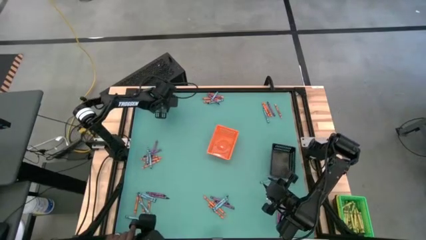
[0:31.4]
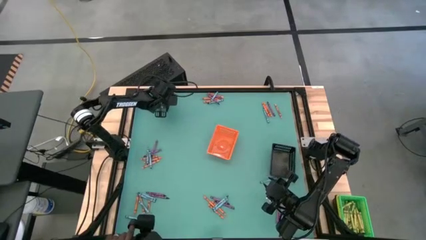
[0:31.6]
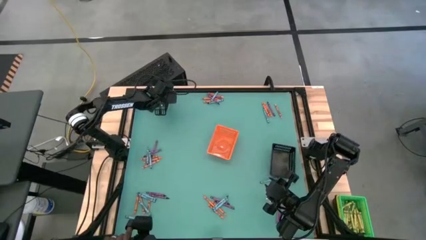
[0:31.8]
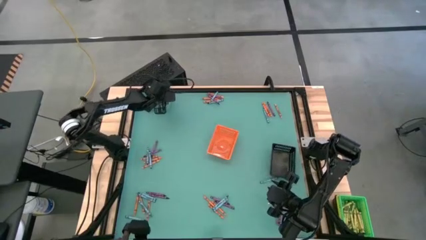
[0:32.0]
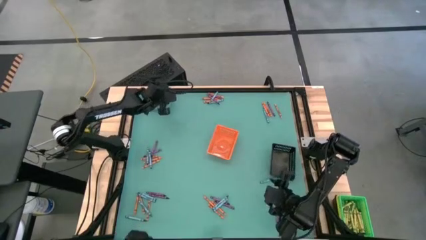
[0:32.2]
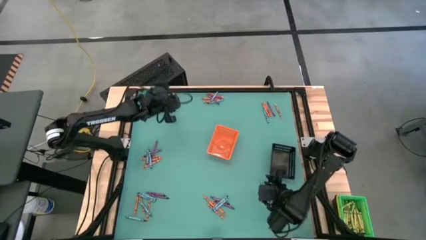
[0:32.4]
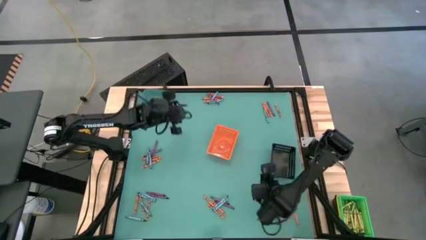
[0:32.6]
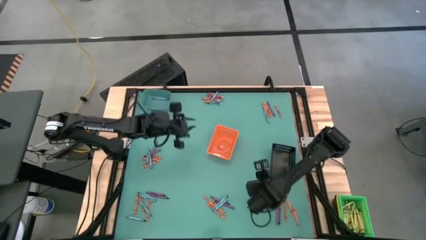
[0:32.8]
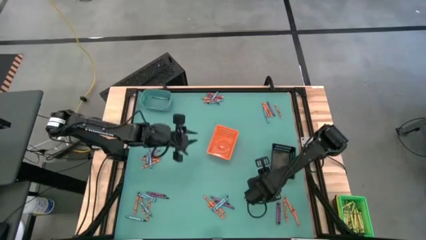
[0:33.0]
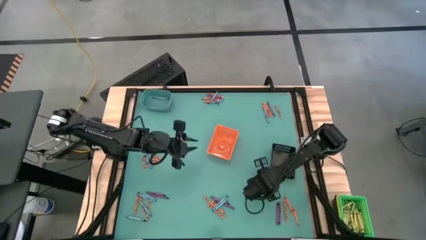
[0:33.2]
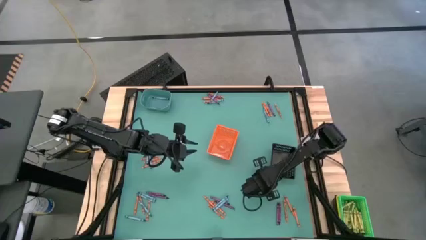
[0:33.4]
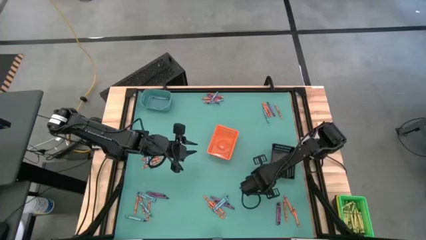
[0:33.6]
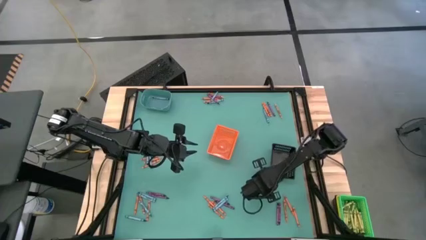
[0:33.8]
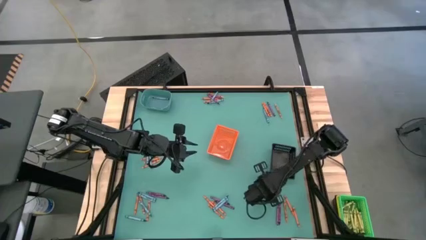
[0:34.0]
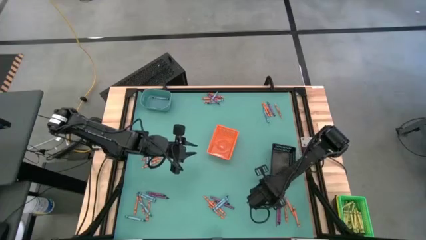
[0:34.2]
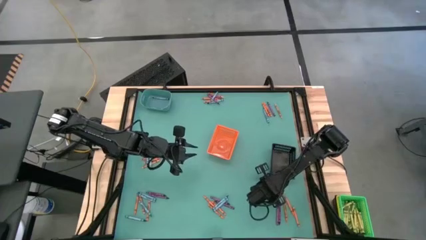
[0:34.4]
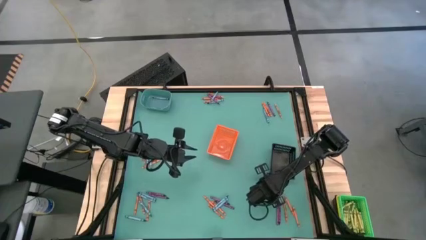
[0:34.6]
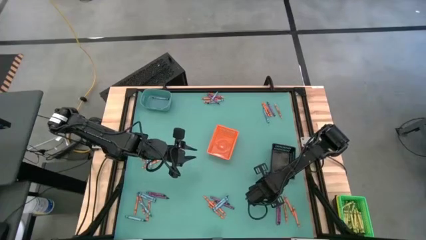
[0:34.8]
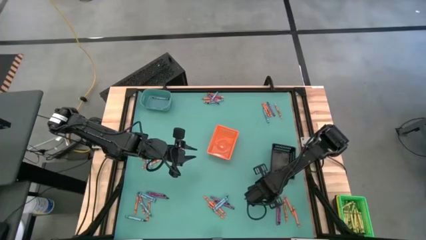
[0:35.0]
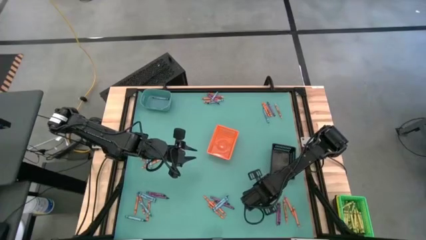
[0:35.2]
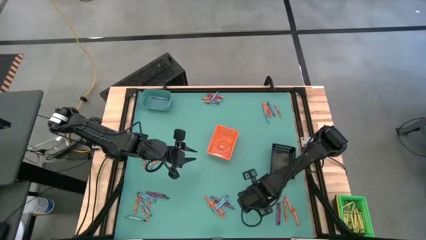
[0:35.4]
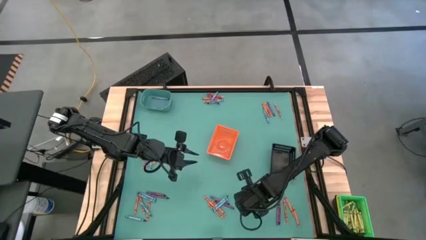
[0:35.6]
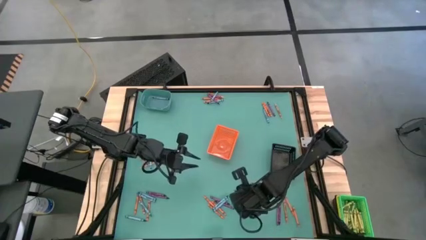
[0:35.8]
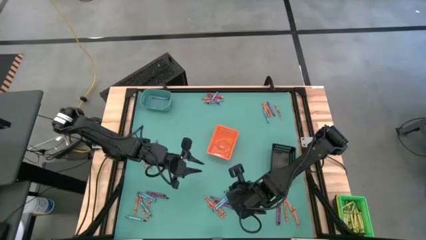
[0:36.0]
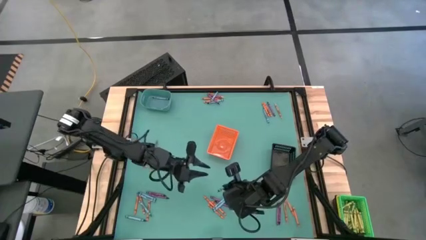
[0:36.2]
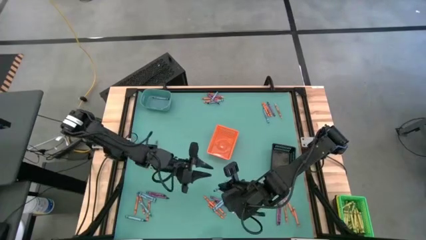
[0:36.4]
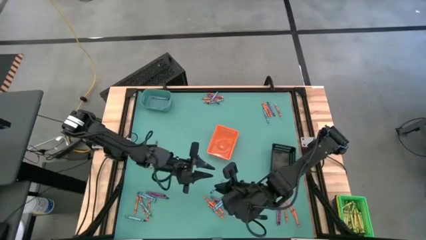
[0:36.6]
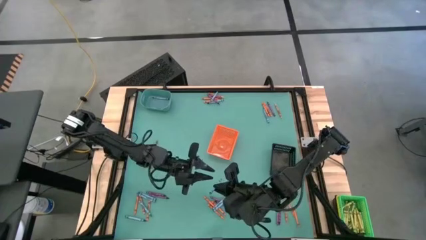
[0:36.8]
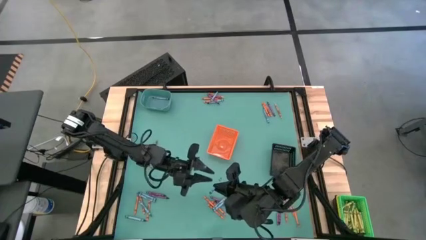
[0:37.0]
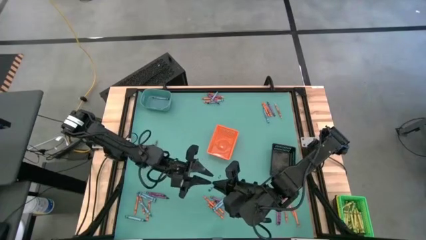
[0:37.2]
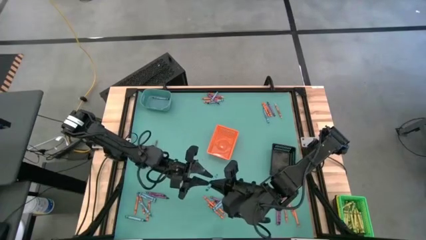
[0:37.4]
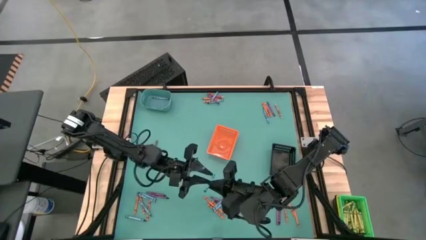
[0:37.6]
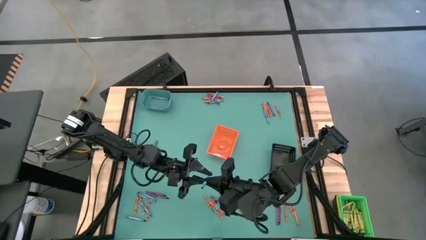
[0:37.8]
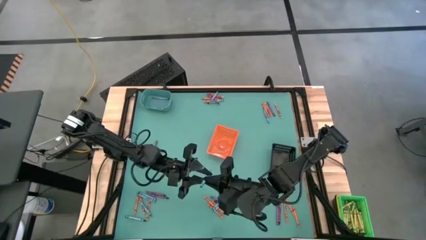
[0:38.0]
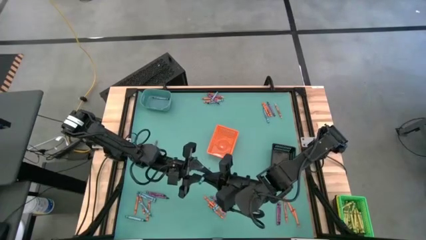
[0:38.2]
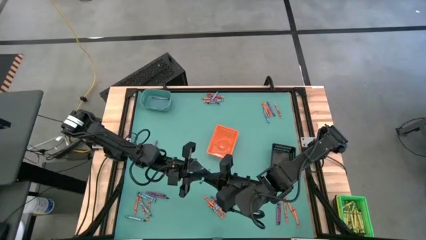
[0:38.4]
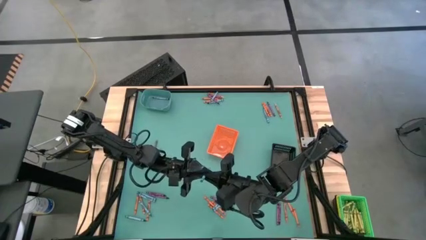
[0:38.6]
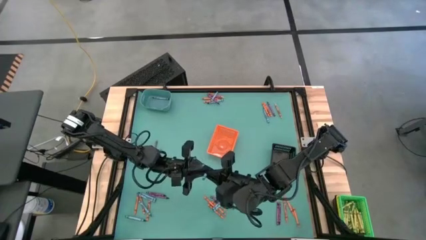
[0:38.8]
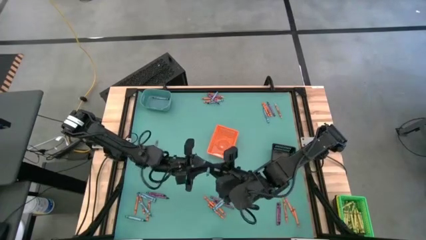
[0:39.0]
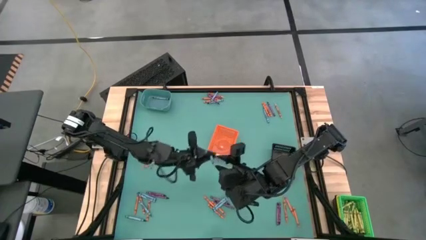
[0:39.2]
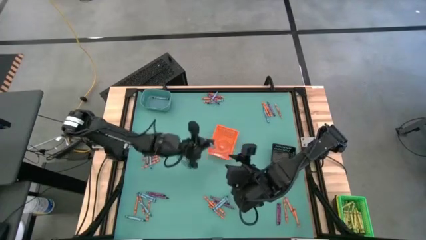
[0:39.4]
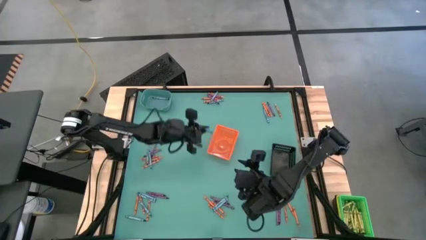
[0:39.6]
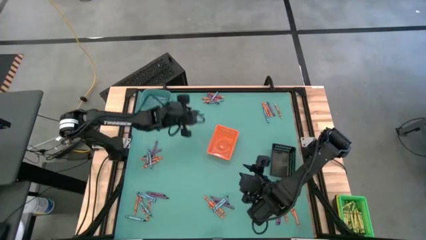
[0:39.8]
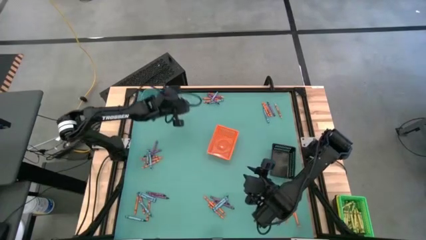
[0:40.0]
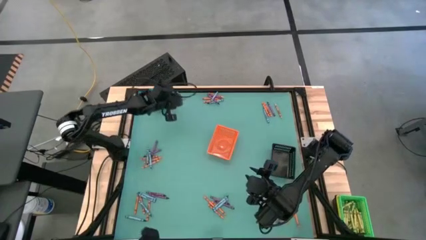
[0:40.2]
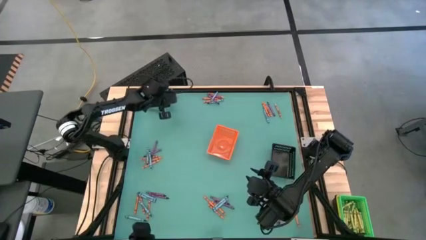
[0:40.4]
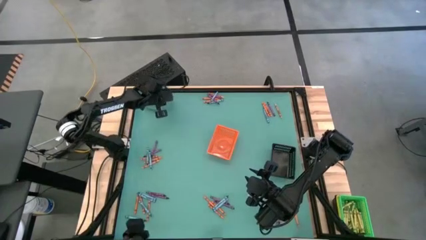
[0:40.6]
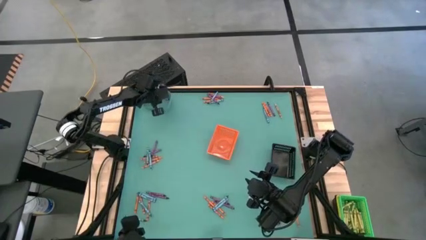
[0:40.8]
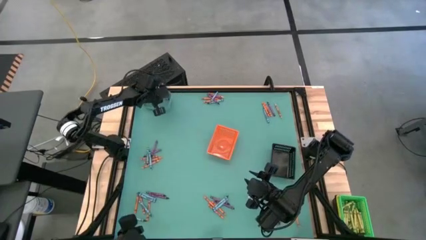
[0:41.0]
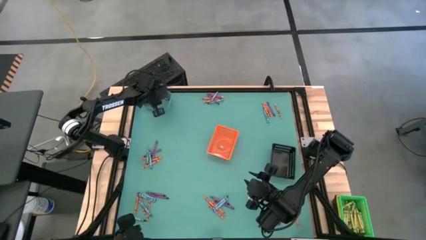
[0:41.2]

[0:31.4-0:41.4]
Task: Sort crayons
Put the blue crayon into the blue bin

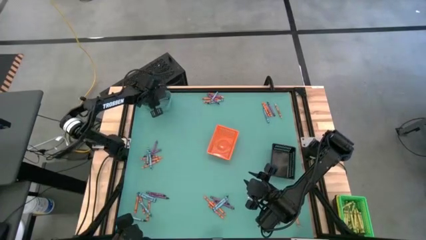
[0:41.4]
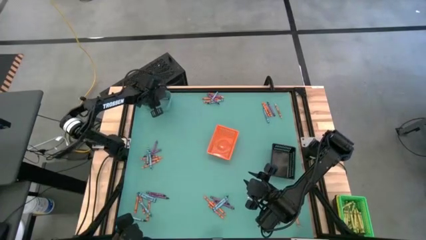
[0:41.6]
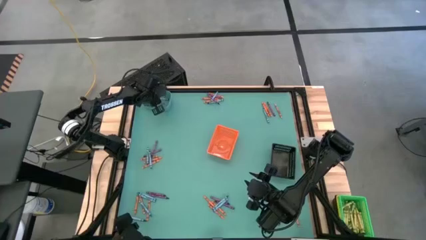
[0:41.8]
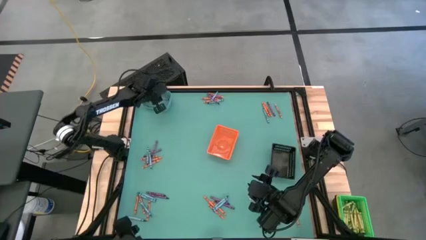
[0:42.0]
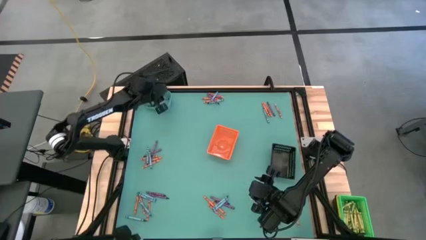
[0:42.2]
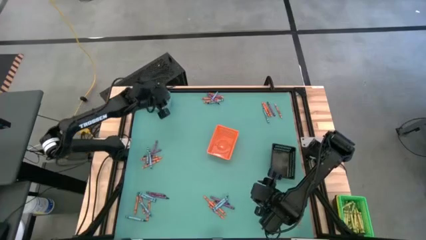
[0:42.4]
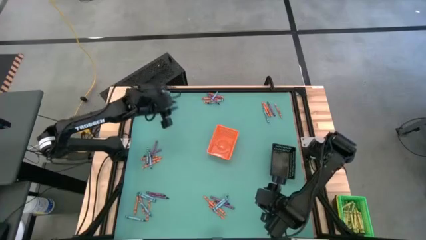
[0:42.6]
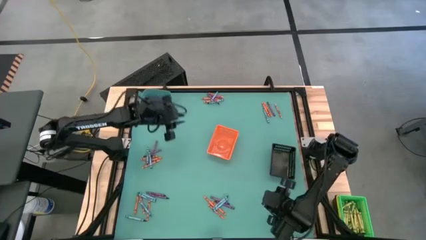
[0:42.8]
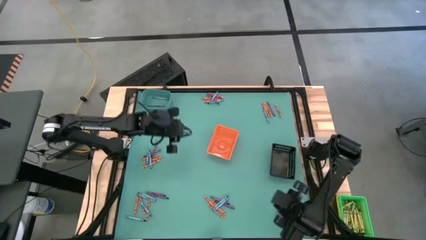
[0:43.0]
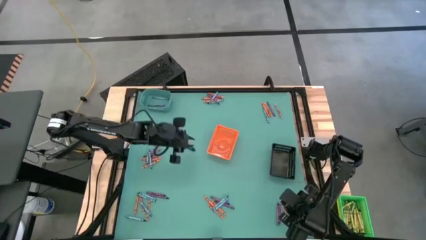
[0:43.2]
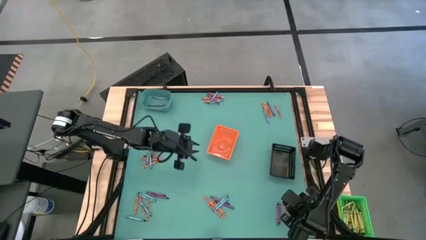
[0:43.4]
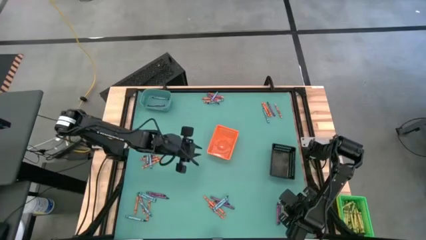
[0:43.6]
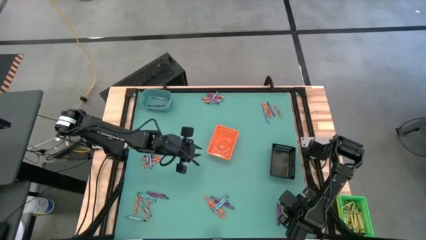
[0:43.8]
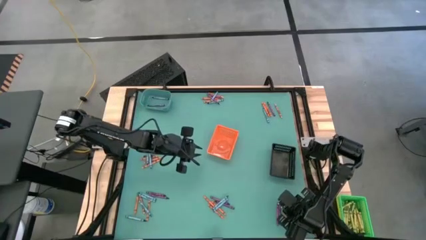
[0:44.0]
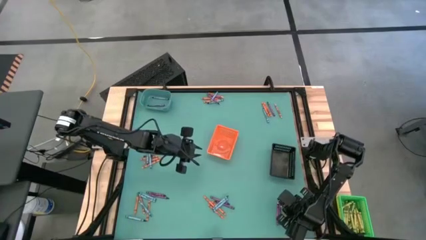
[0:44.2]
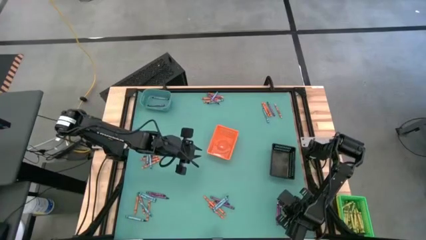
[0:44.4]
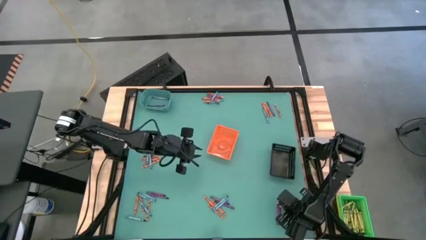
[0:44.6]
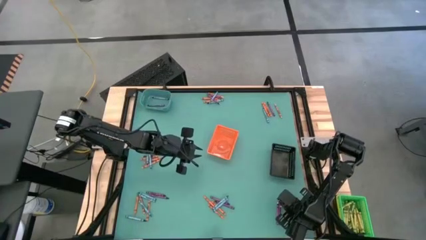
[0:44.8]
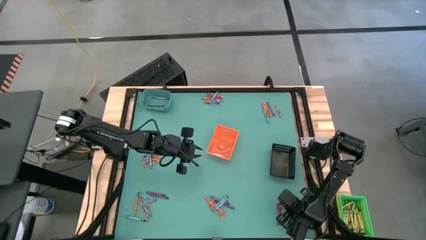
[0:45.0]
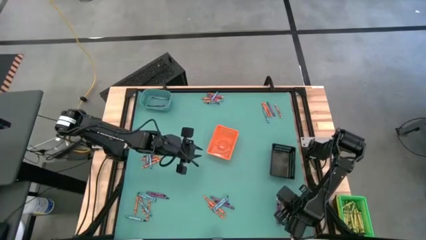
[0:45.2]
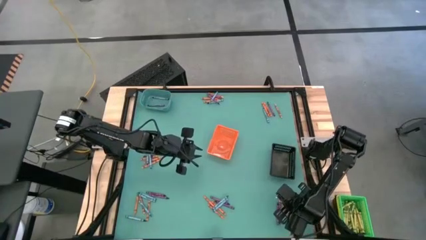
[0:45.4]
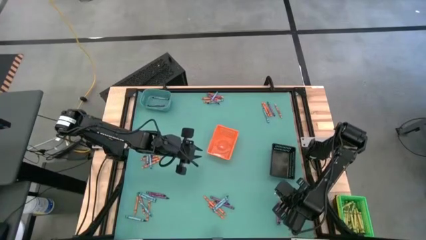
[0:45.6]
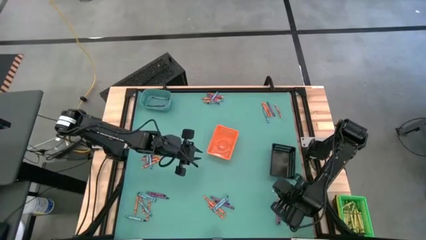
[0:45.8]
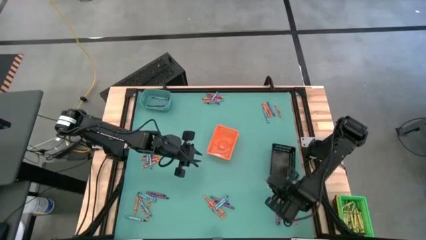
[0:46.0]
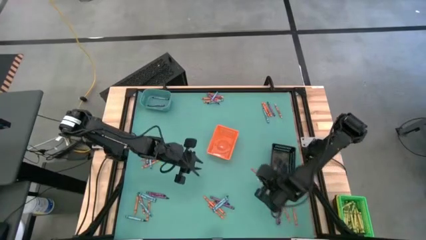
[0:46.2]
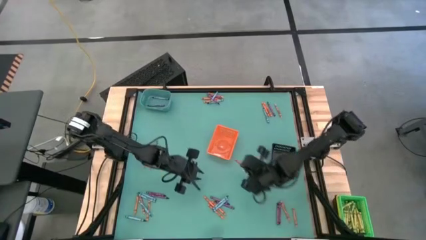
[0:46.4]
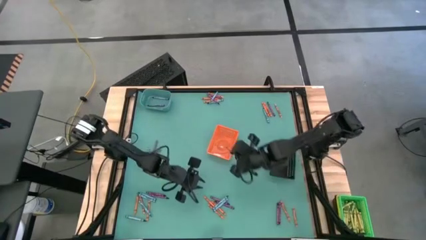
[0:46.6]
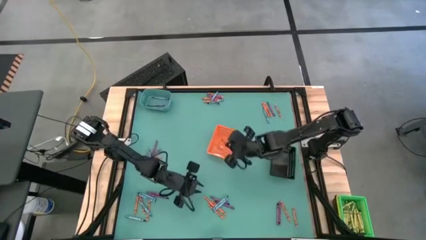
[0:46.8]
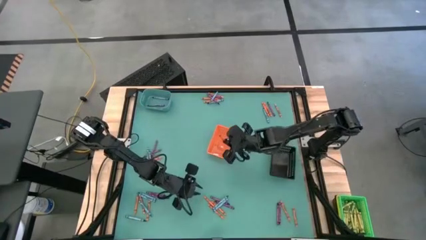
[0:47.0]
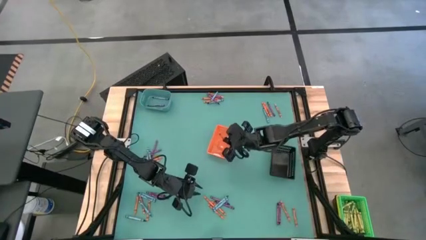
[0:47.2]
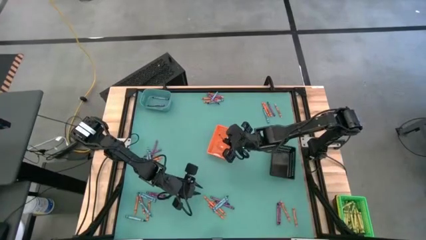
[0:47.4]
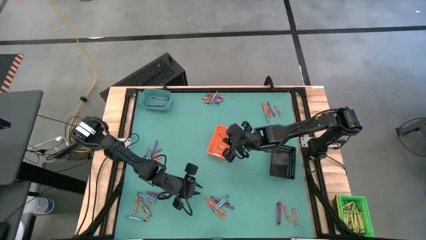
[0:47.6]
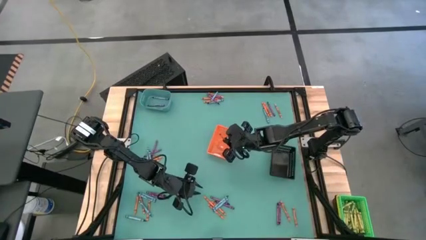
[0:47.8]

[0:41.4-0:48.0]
Put the orange crayon into the orange bin
